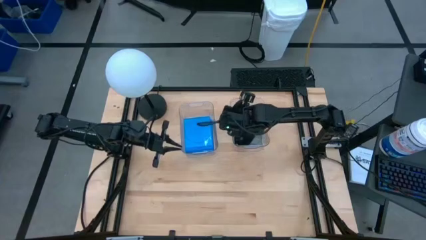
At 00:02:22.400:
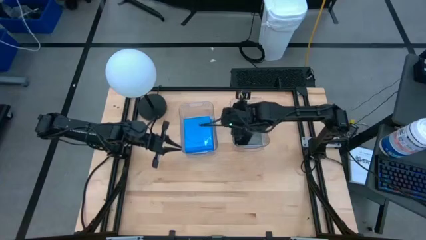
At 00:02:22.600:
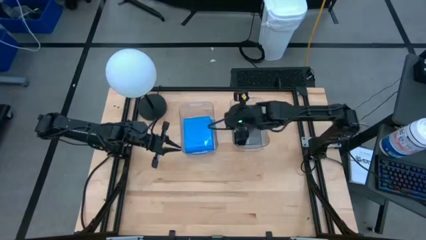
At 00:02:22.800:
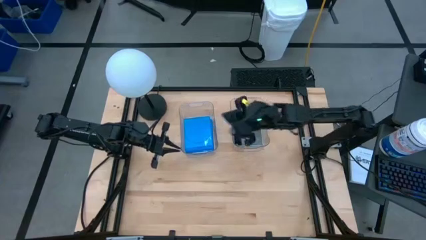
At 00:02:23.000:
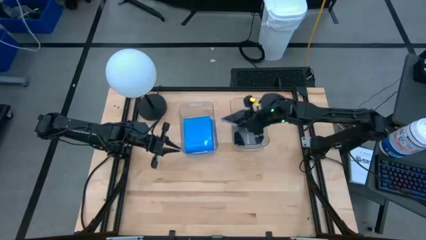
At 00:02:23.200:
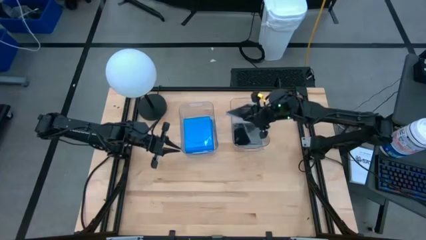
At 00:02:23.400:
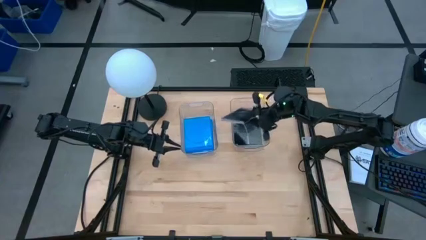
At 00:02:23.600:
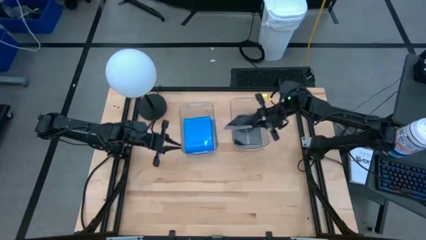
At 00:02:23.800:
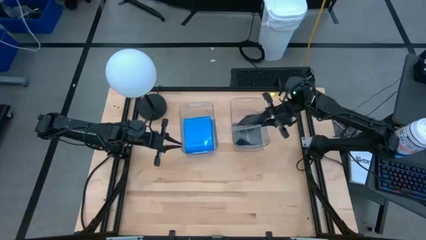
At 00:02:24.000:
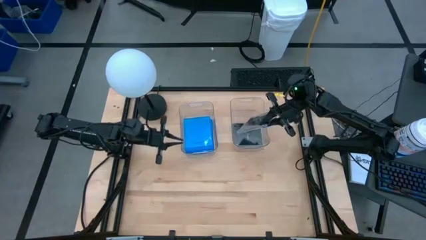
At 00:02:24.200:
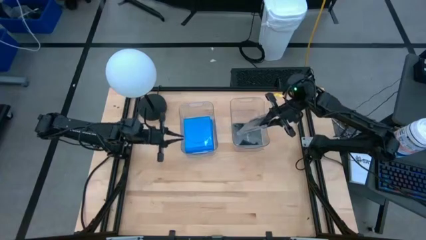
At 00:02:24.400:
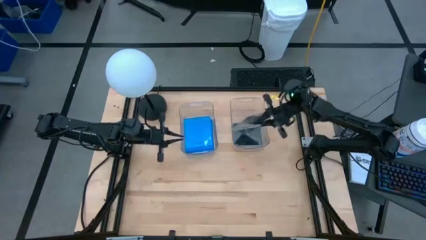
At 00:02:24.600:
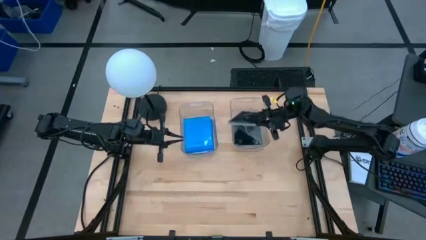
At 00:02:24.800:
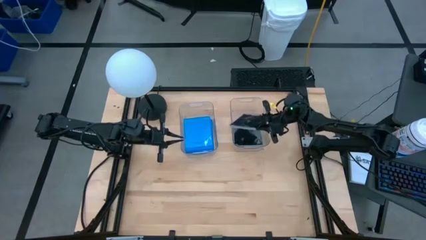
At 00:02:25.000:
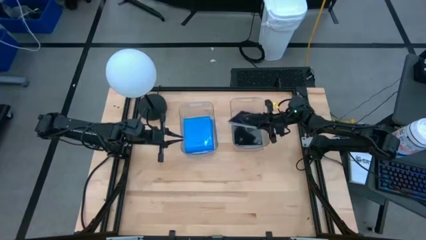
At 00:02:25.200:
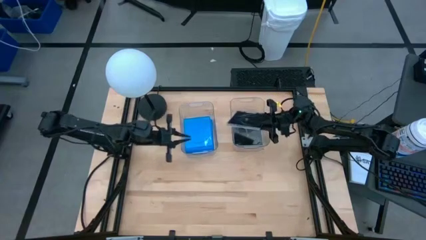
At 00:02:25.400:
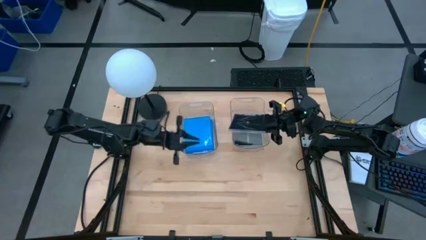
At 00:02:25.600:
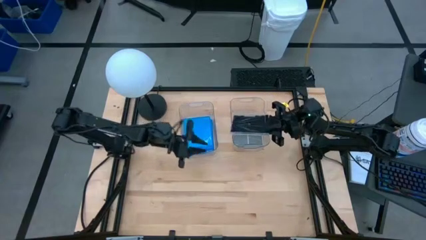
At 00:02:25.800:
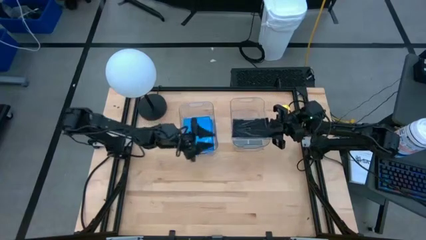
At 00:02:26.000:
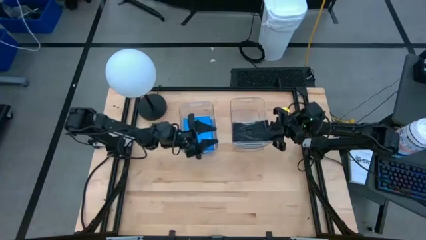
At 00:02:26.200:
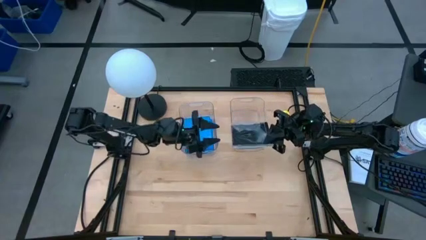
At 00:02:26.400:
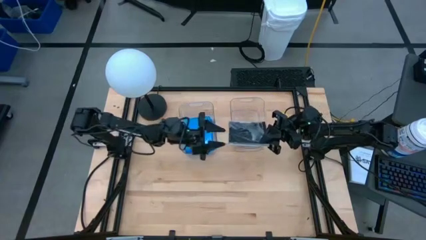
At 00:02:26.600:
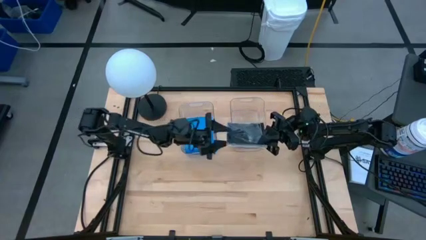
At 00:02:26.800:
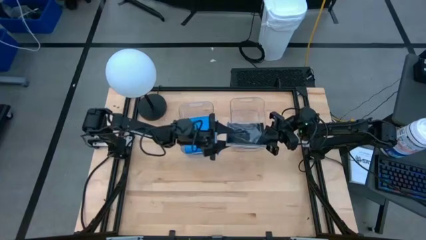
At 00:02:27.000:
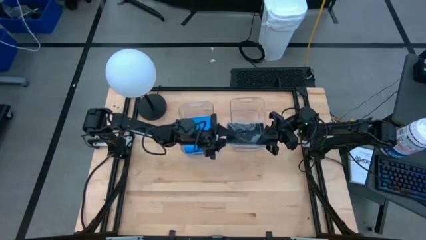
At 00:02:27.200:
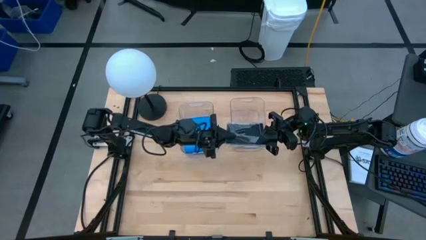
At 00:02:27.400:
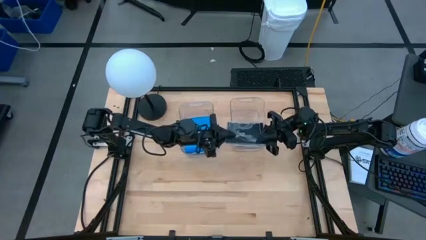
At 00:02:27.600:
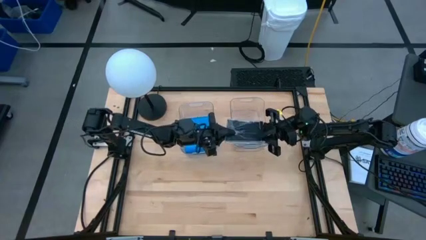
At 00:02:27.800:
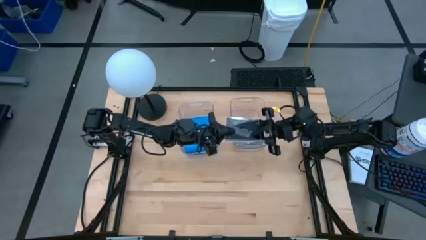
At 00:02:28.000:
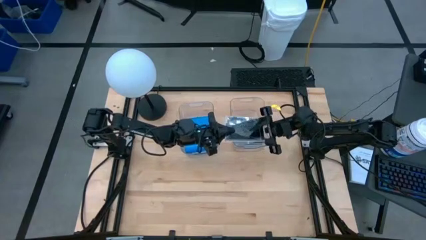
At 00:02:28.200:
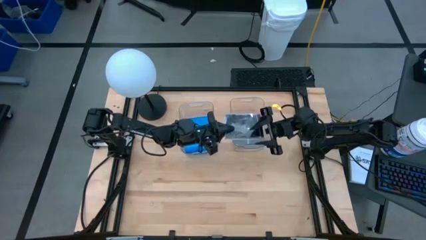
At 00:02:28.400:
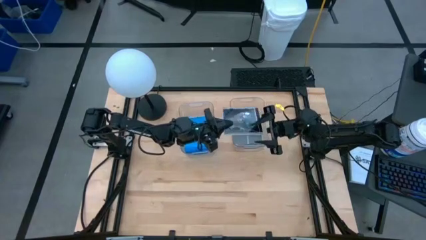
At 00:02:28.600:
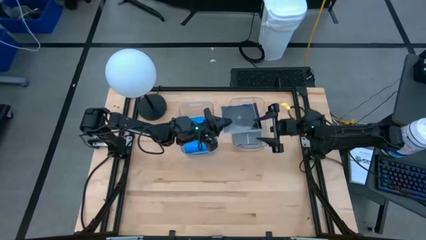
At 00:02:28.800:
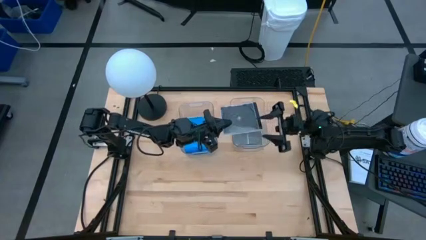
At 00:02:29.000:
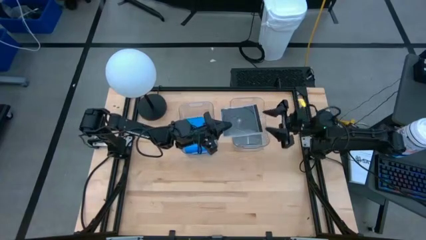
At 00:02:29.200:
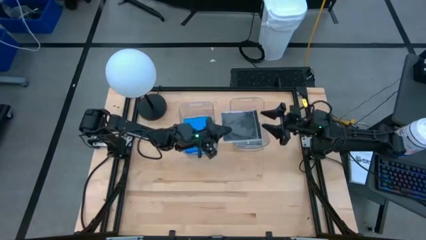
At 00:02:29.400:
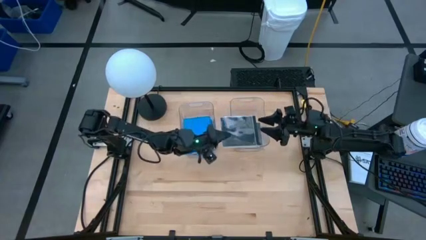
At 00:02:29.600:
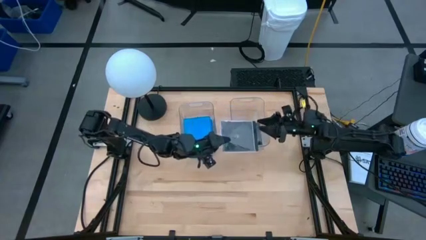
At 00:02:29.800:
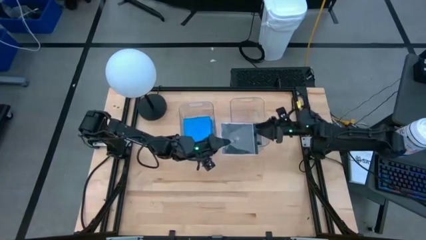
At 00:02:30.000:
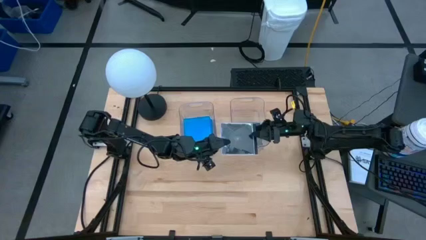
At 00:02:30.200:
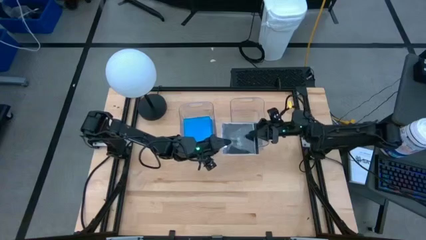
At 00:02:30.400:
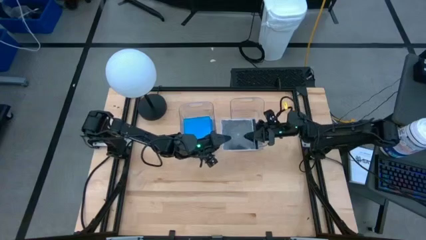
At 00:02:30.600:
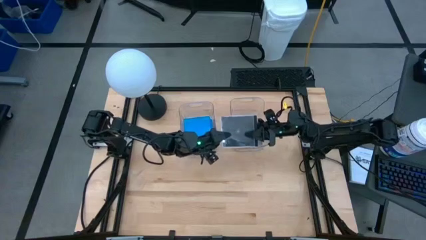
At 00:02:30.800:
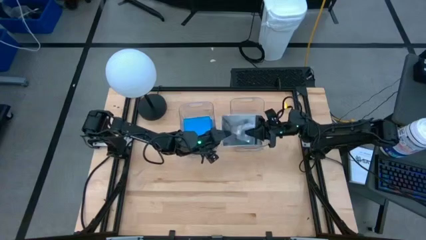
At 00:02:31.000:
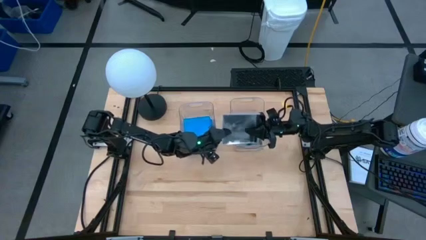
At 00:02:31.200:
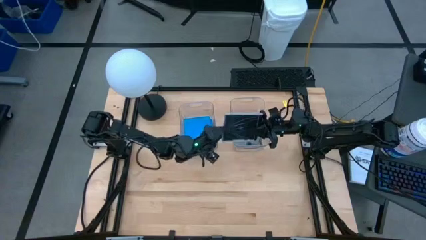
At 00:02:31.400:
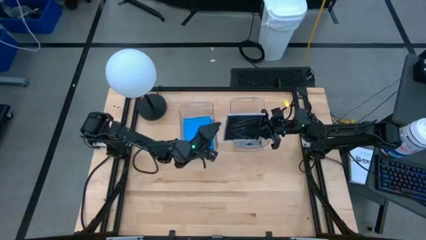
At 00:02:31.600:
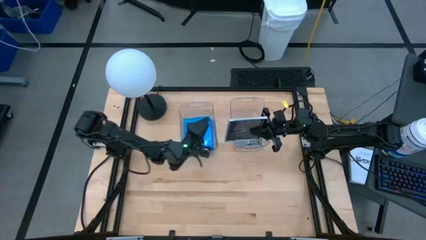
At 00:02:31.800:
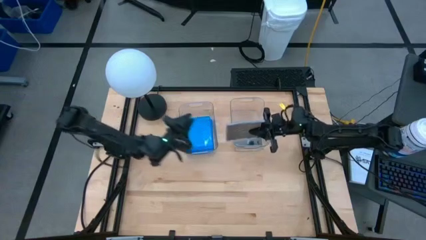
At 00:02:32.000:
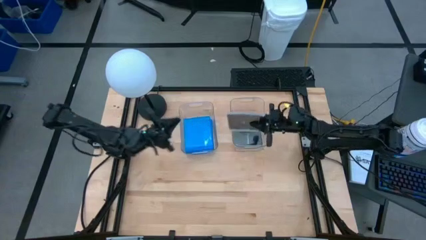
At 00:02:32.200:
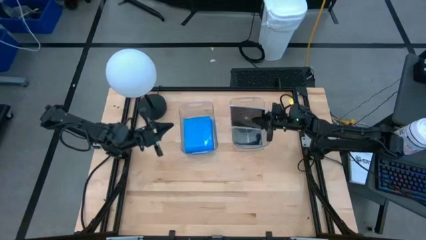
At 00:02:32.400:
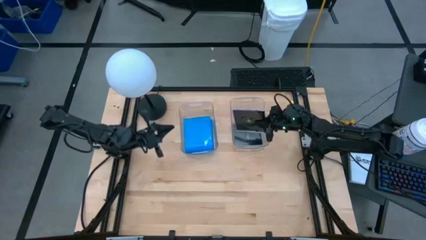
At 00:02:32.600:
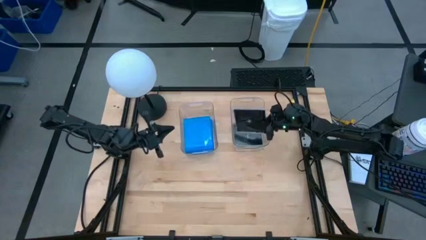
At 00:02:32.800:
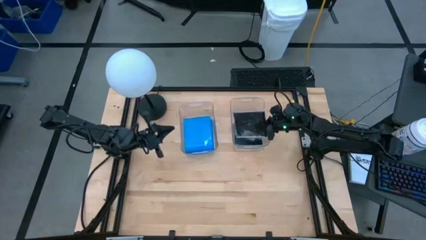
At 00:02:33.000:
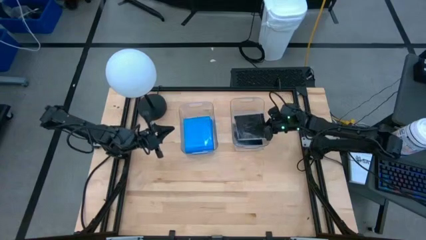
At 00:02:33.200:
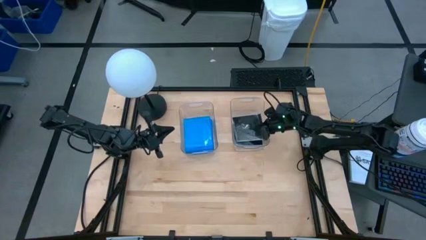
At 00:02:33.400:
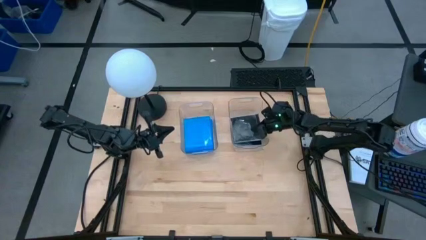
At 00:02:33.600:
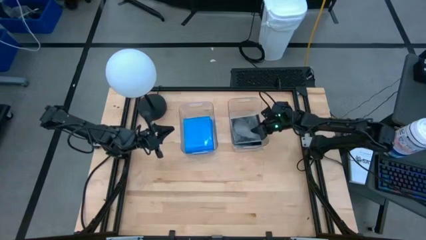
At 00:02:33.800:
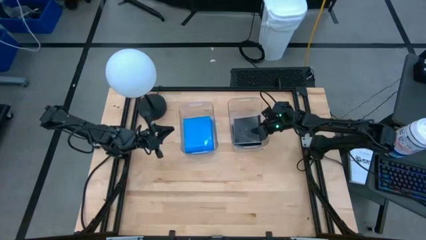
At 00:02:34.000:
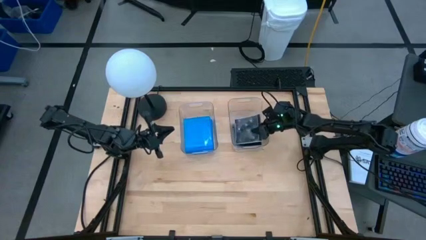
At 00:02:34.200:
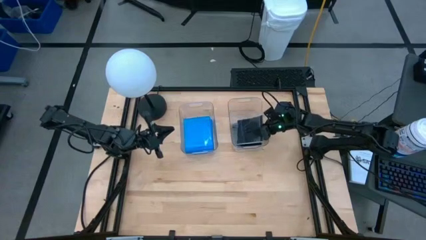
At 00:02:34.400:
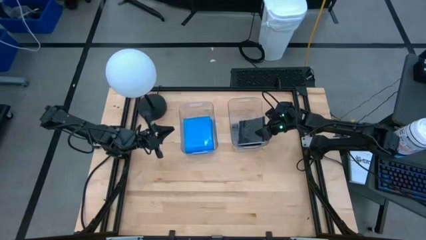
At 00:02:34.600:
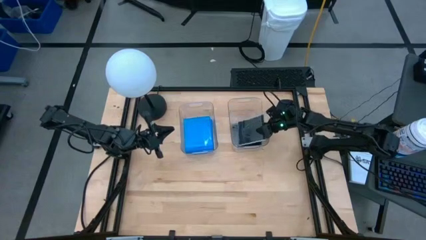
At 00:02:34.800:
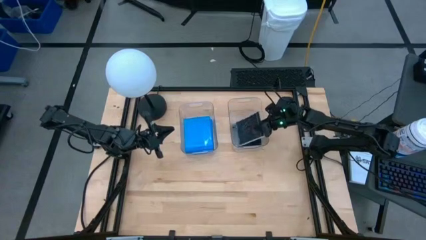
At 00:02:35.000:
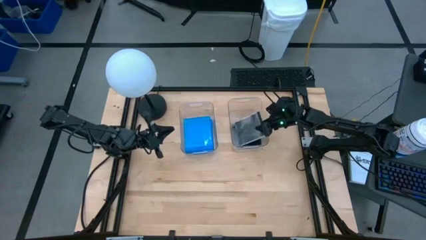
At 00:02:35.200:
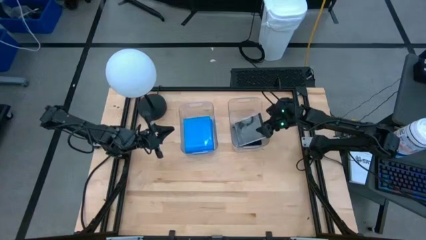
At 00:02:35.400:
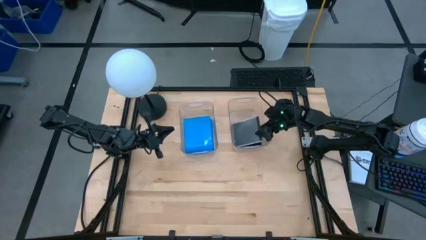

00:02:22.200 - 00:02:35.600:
Task: Pick & place jewel cases by type
Put the black cd case into the right transparent bin

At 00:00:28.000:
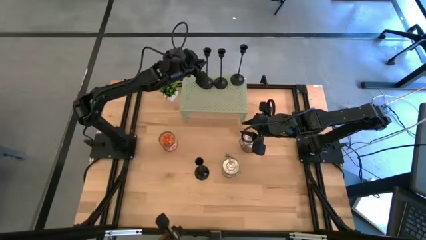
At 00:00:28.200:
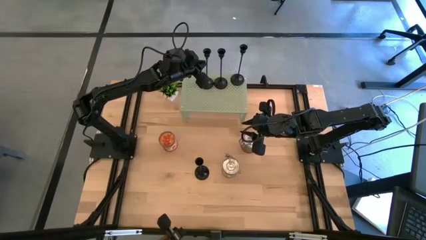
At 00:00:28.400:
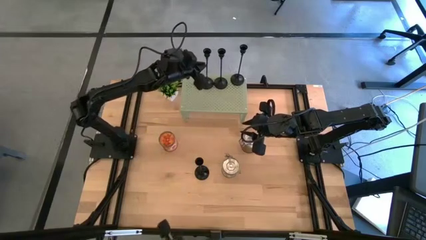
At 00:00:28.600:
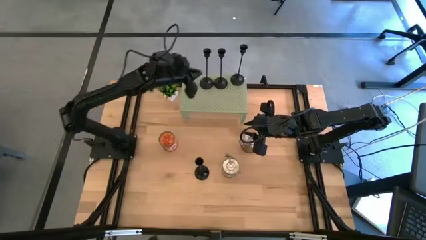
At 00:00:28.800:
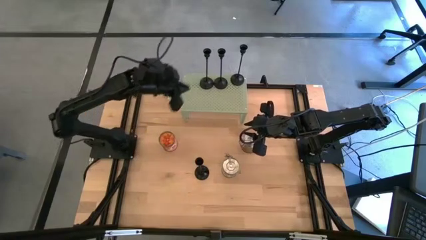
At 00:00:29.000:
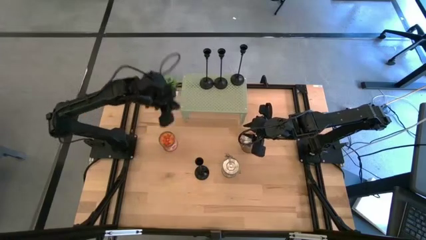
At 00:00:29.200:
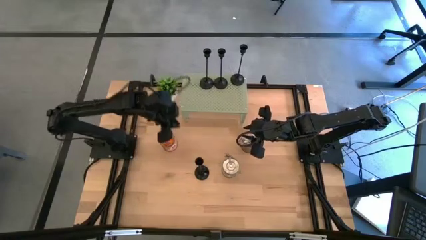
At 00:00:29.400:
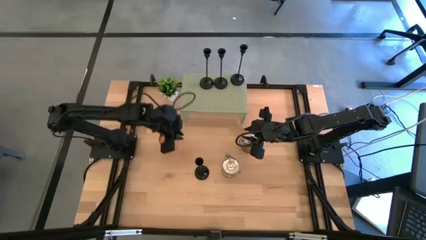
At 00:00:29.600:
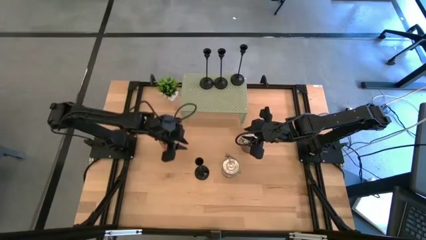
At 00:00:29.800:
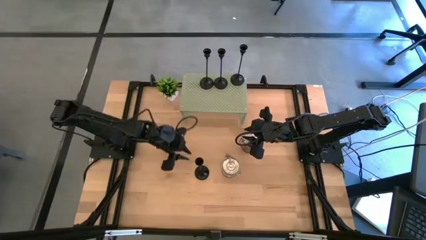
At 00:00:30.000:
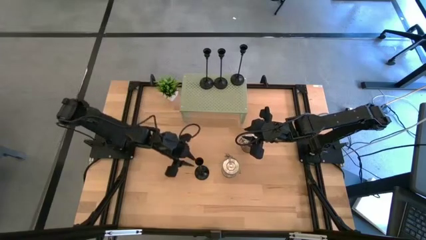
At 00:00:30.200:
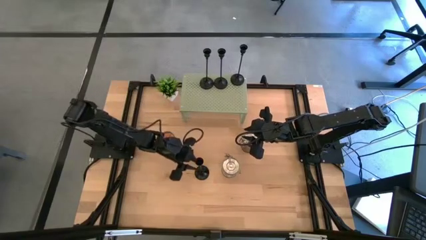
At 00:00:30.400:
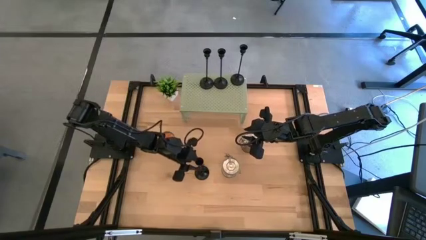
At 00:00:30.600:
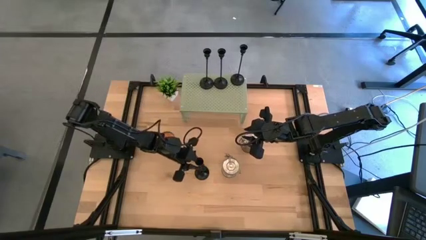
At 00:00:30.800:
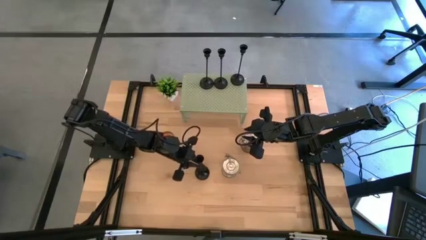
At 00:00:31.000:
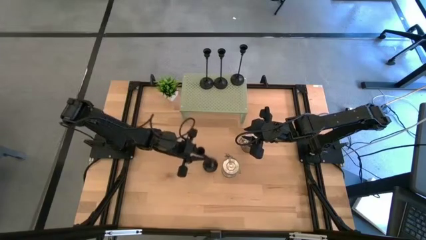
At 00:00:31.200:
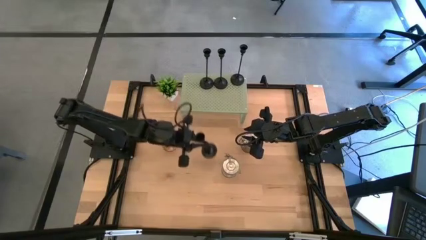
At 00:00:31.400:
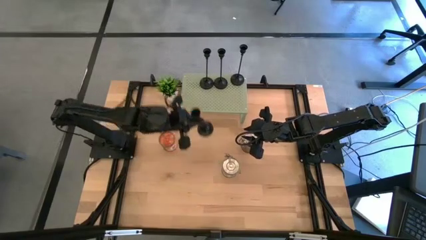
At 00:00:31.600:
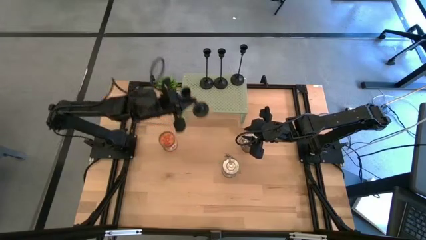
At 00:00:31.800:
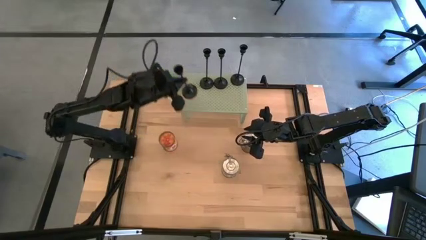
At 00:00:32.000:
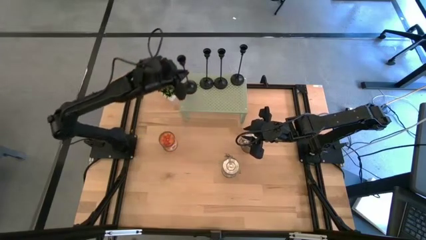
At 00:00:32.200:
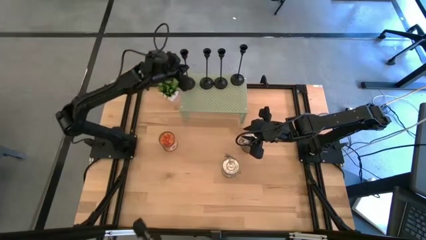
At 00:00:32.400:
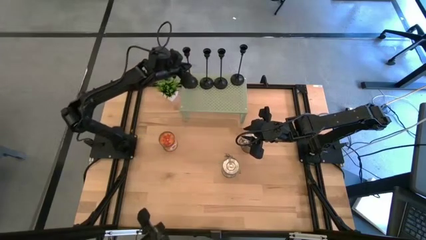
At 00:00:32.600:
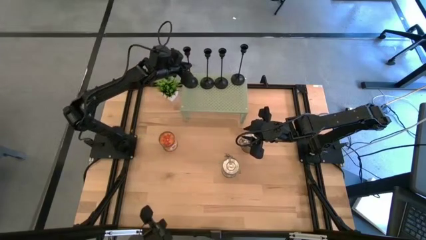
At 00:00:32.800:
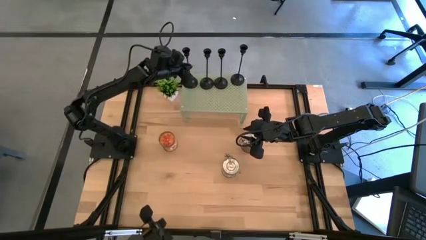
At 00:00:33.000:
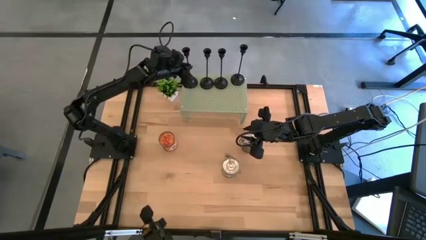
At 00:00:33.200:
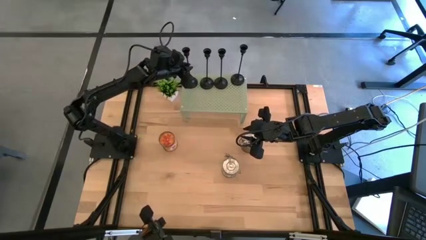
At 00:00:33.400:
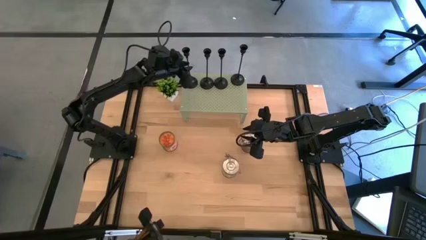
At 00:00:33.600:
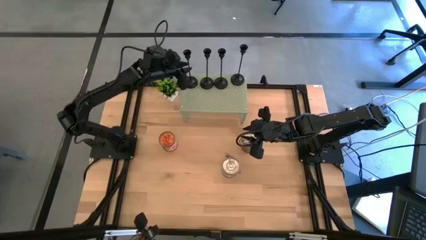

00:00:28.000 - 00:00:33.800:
Task: Pick & Place candle stick holders
Put the black candle holder on the shelf aligned with the other black candle holders
